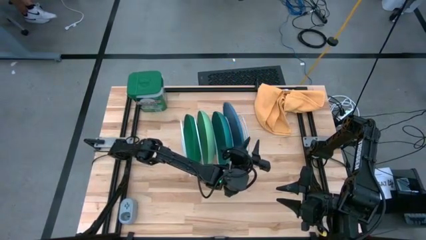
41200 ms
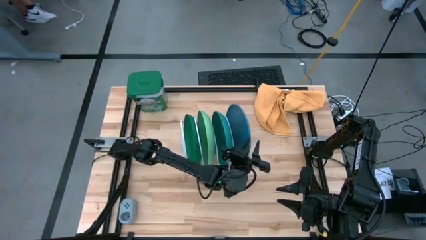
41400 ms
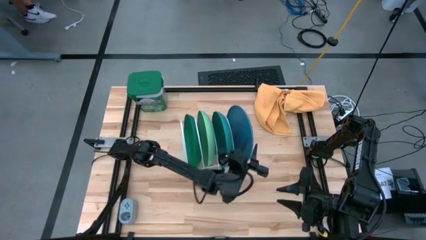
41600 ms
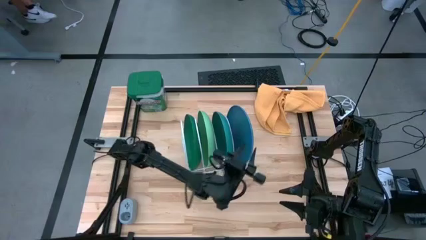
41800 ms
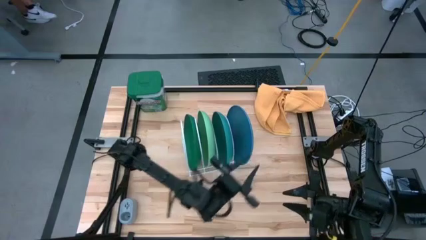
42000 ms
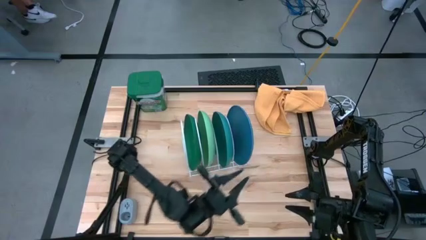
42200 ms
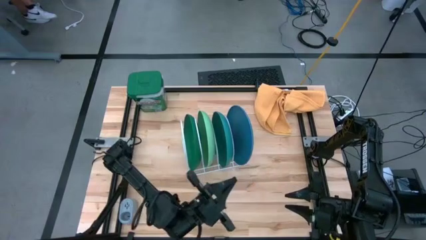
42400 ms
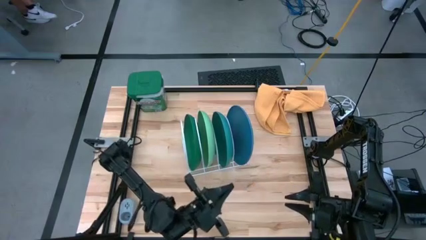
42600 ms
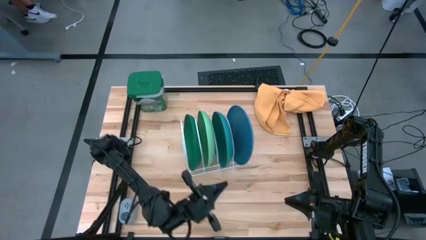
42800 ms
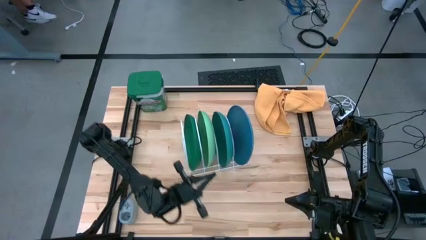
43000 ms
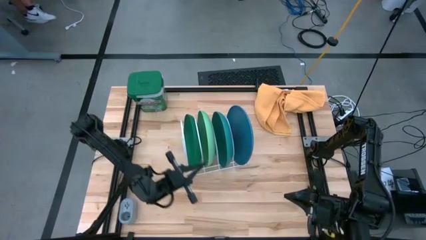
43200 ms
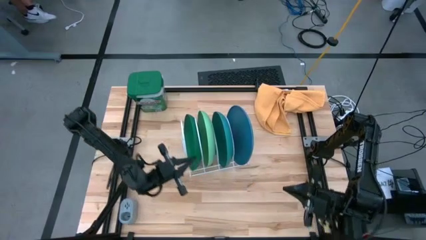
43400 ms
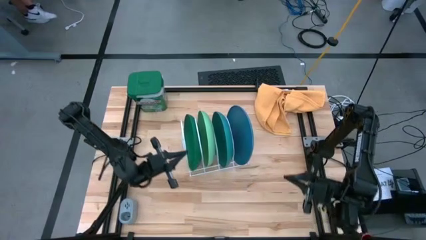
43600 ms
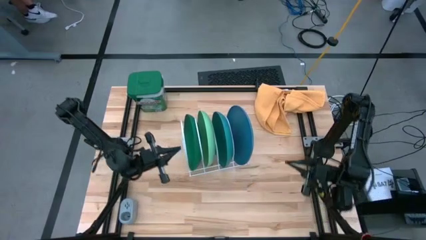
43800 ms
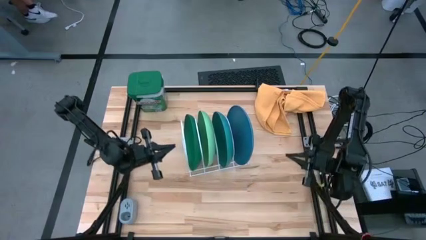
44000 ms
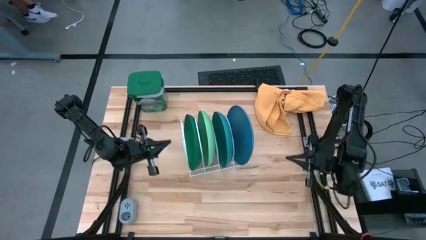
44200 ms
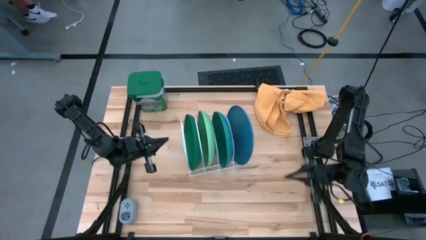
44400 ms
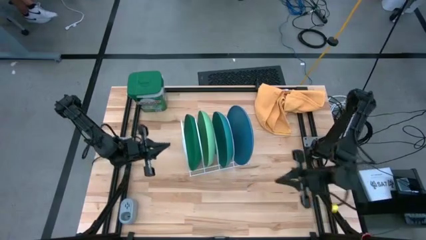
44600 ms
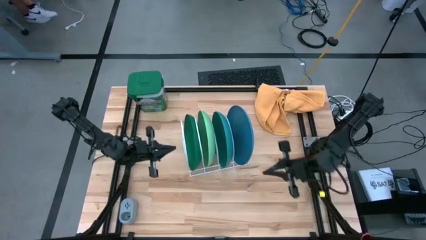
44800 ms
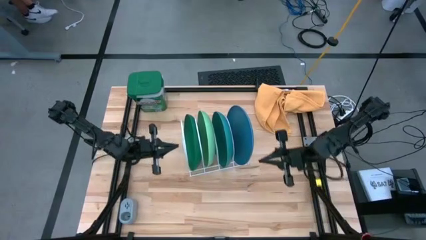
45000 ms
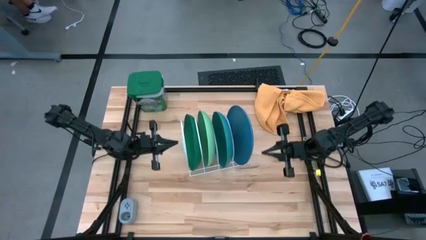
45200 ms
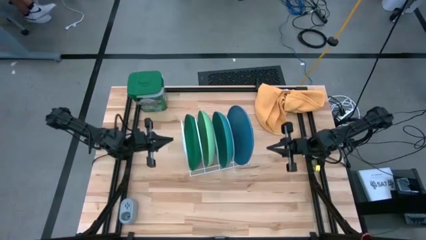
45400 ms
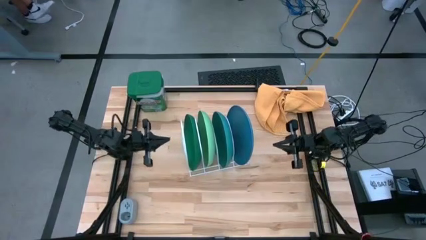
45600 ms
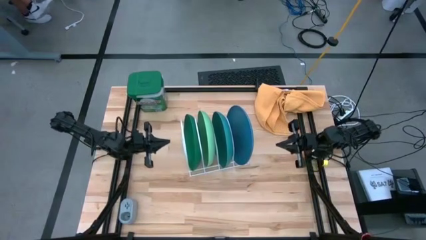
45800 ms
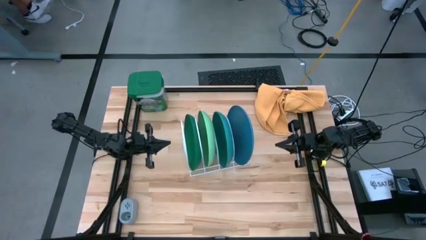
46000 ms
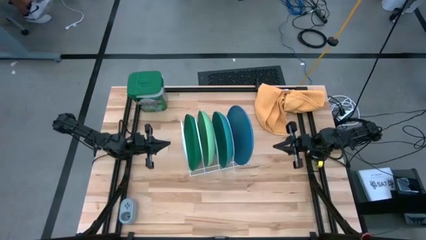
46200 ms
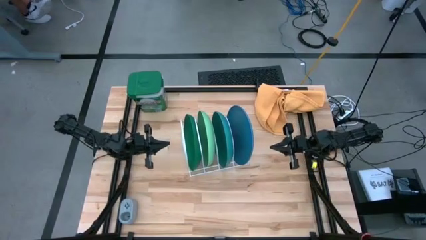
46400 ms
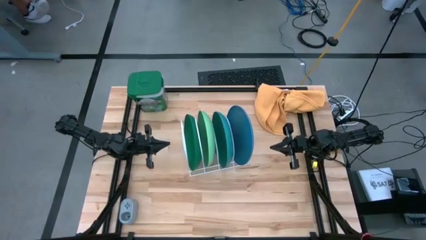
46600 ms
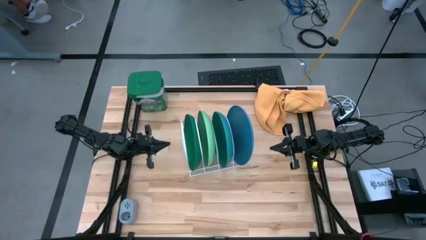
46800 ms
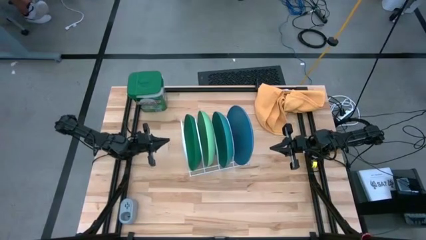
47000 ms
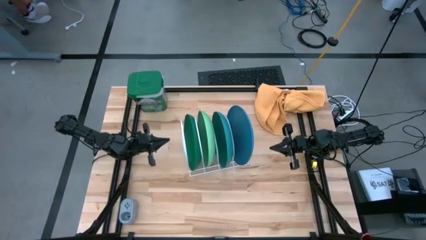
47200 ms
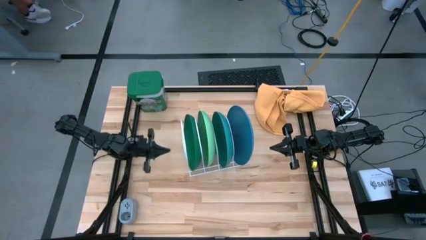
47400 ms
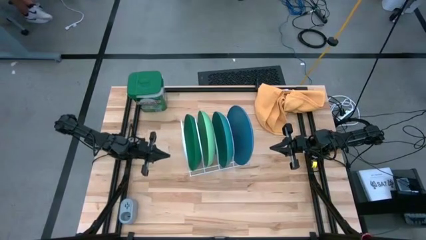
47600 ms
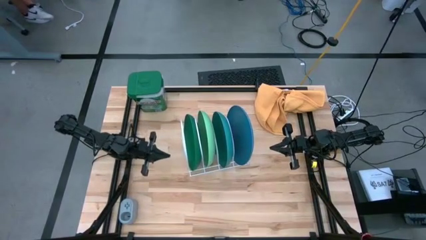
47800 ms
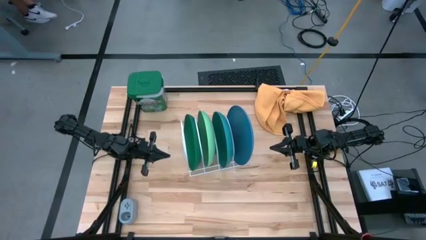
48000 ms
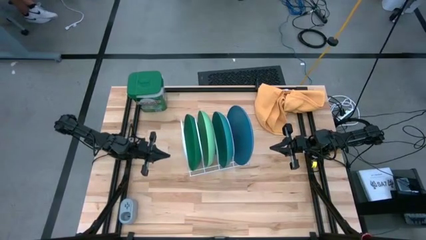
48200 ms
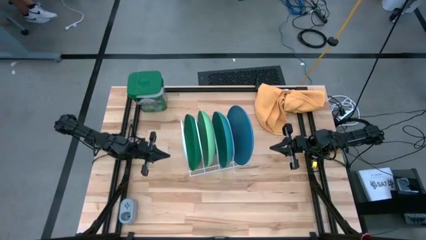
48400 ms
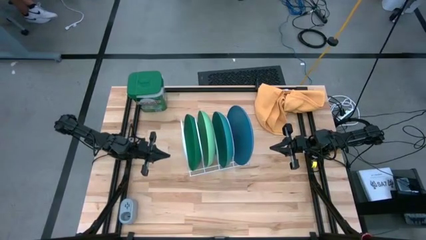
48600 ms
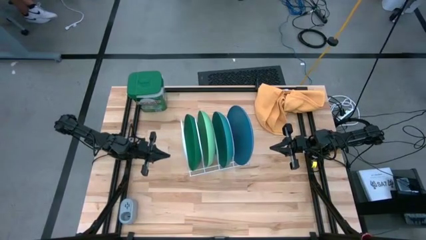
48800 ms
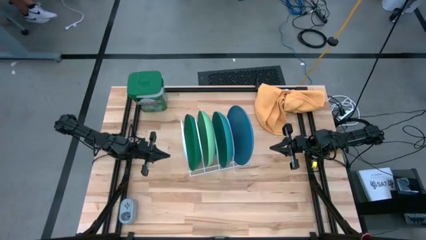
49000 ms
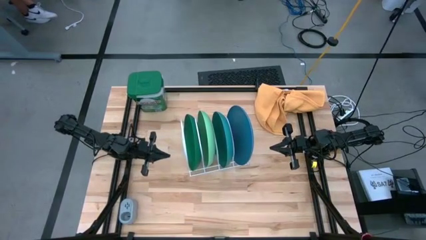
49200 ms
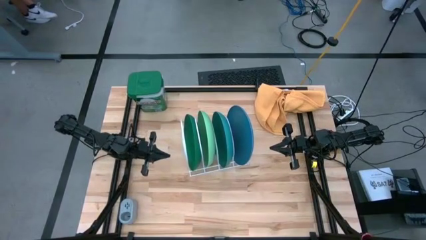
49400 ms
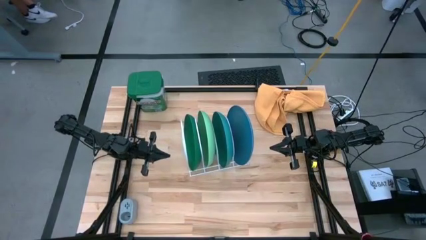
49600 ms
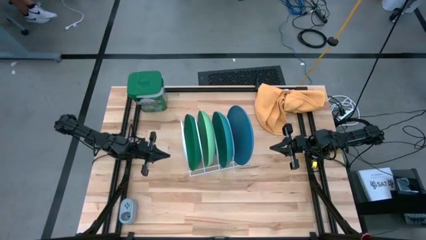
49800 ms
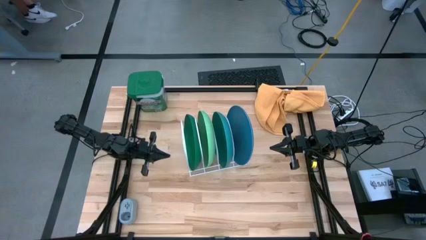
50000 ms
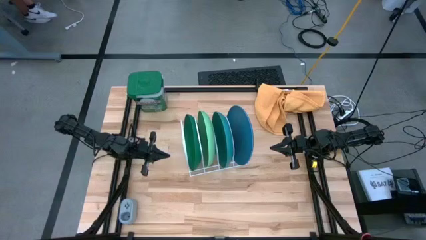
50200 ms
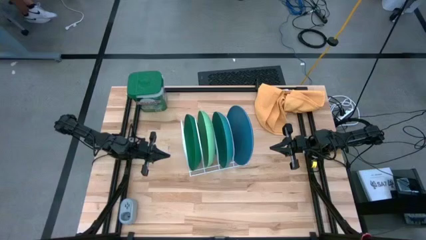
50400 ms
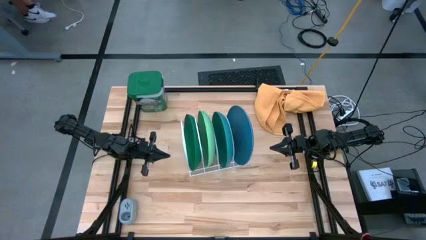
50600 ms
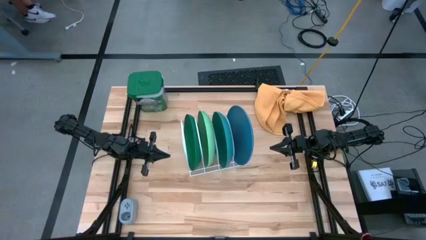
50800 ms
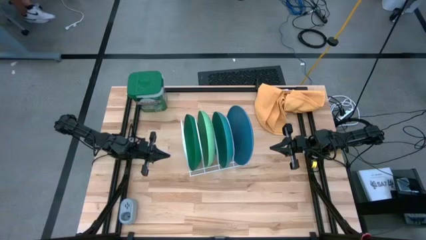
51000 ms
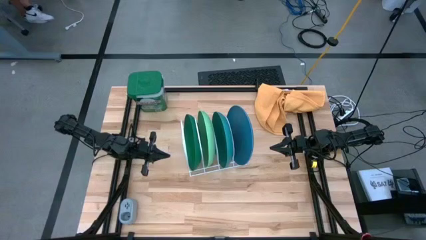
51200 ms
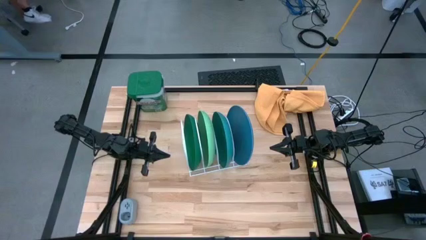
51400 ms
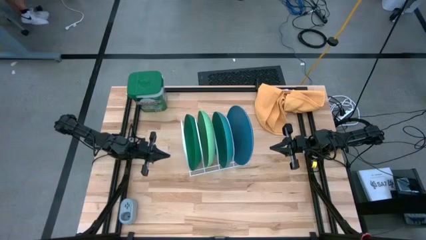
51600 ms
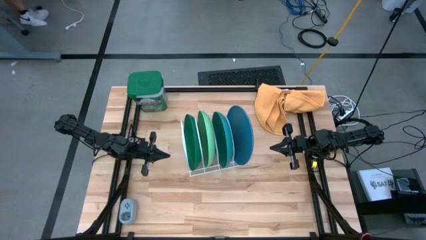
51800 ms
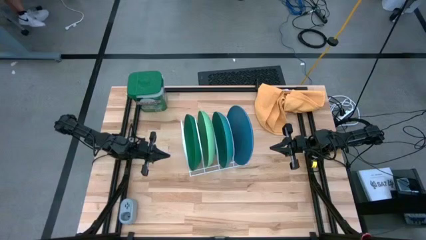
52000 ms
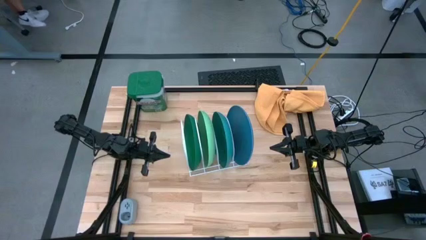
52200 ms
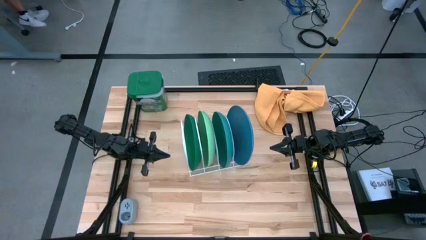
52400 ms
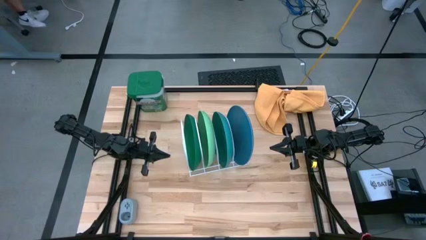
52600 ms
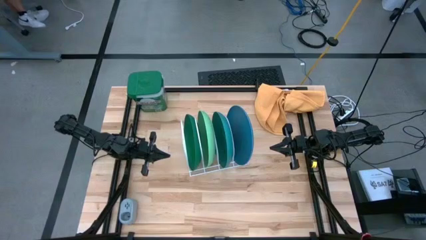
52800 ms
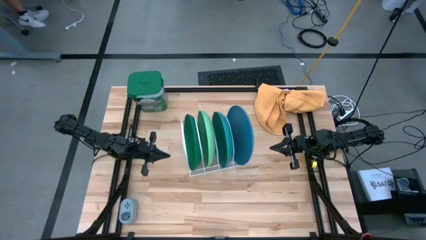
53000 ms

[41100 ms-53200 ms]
Task: Sort dishes
Return to Home Position
